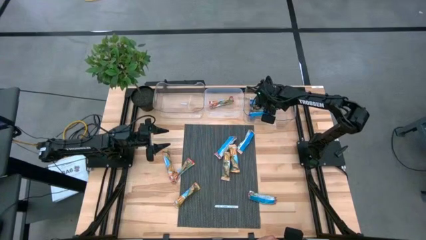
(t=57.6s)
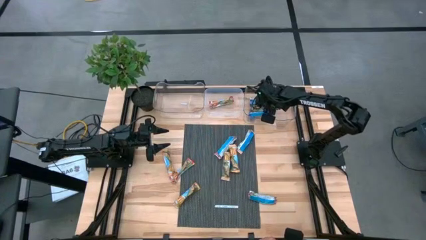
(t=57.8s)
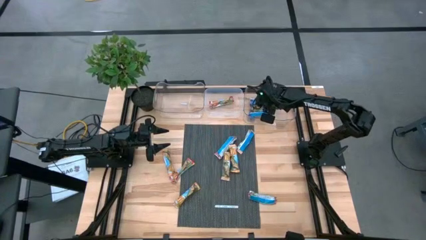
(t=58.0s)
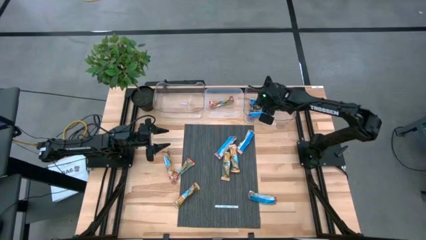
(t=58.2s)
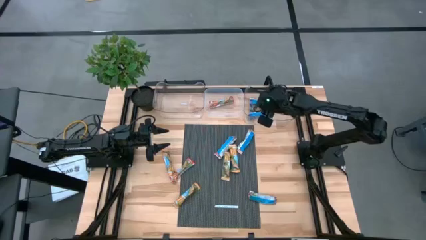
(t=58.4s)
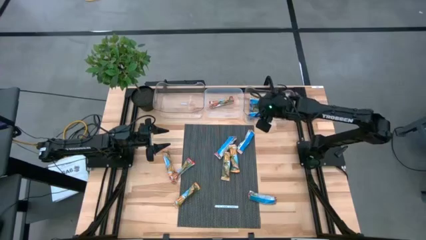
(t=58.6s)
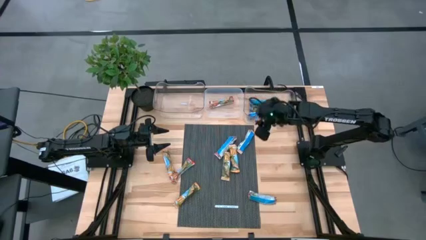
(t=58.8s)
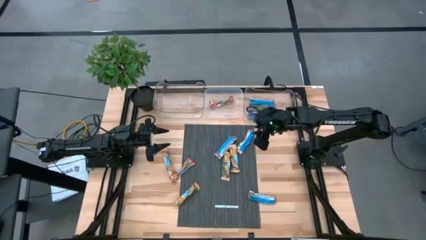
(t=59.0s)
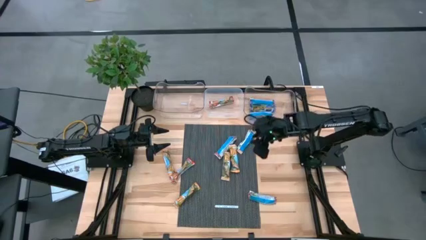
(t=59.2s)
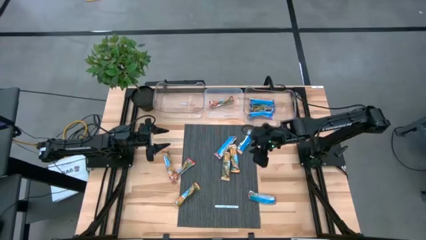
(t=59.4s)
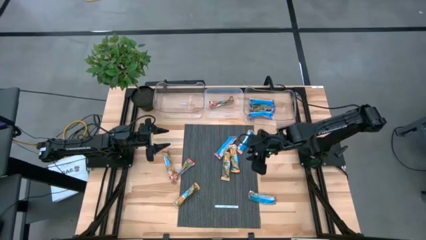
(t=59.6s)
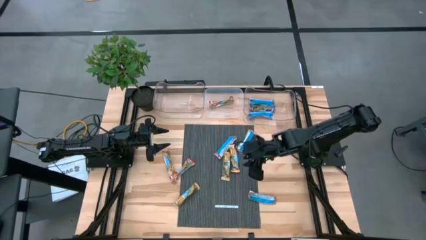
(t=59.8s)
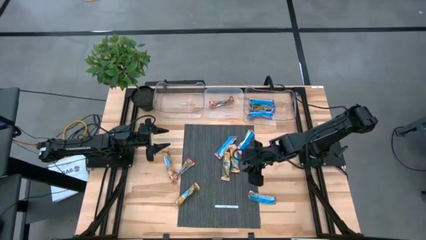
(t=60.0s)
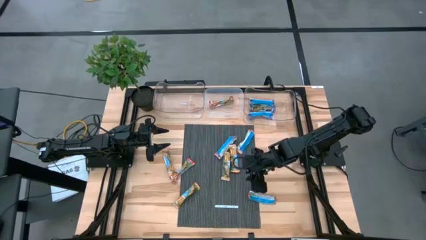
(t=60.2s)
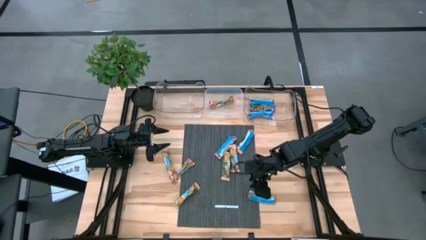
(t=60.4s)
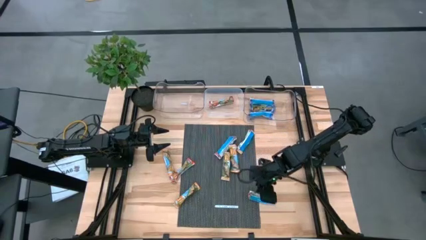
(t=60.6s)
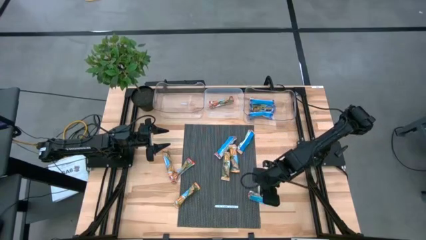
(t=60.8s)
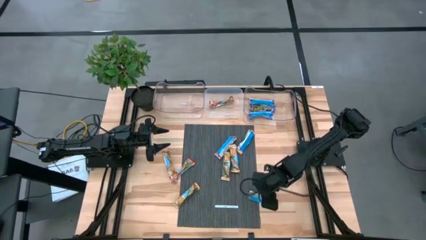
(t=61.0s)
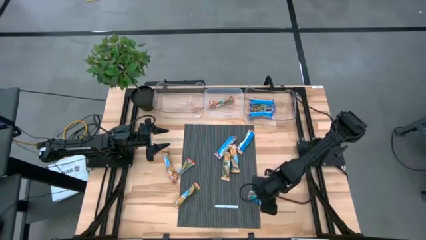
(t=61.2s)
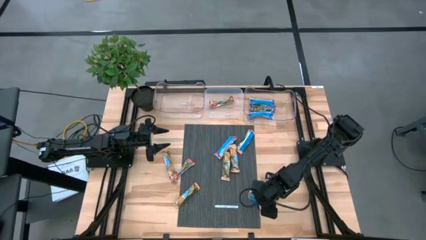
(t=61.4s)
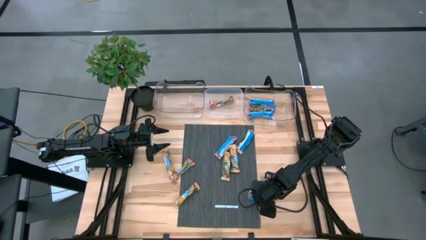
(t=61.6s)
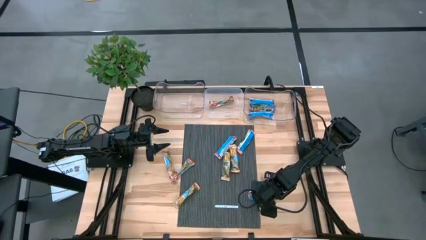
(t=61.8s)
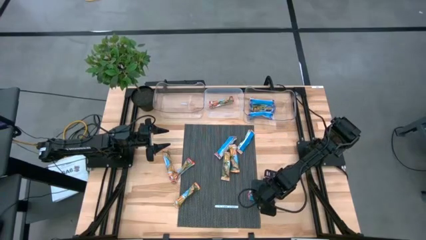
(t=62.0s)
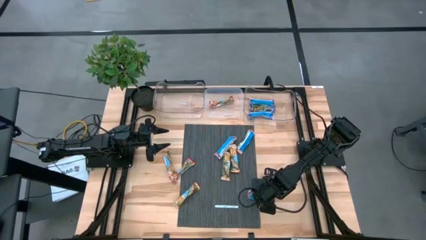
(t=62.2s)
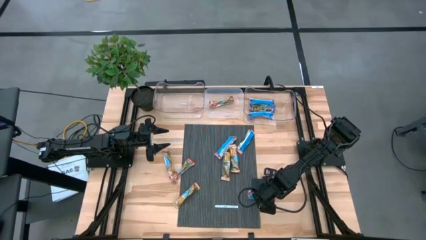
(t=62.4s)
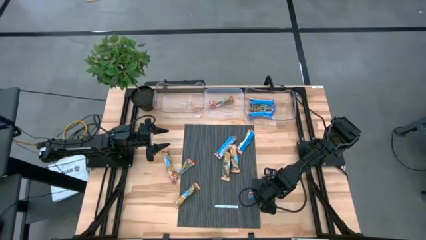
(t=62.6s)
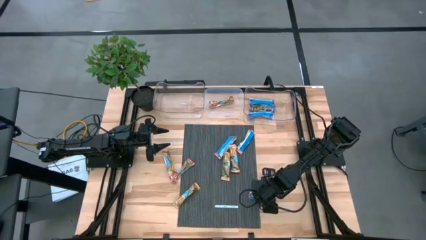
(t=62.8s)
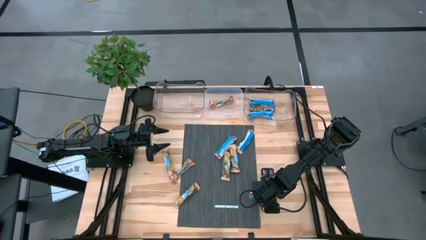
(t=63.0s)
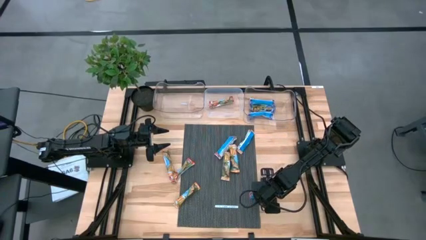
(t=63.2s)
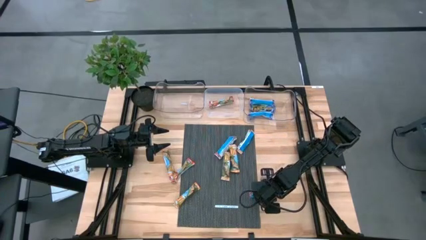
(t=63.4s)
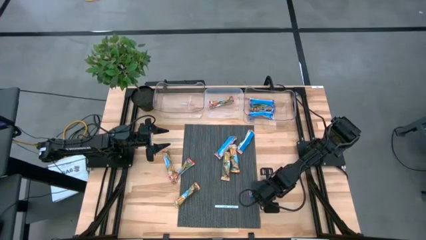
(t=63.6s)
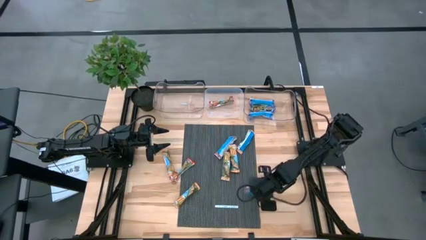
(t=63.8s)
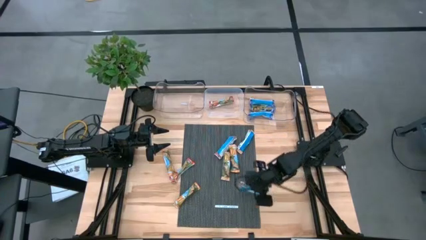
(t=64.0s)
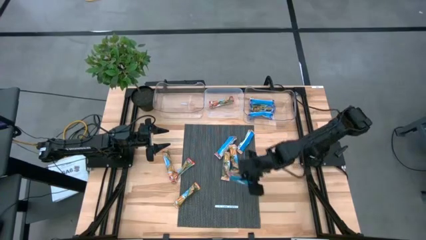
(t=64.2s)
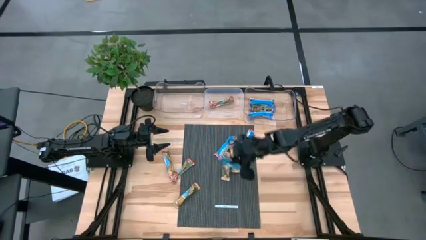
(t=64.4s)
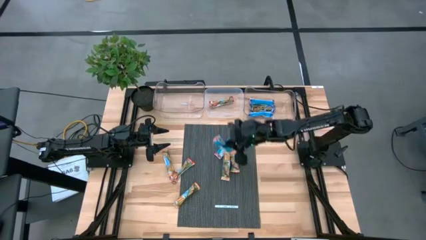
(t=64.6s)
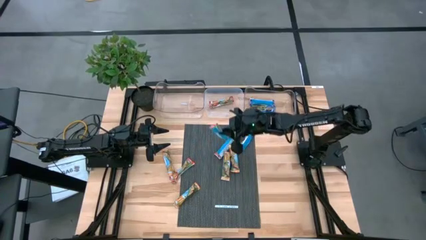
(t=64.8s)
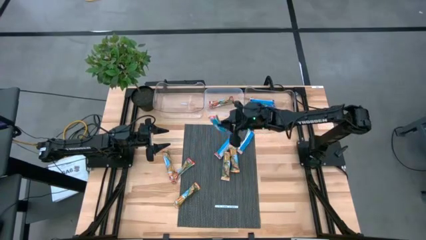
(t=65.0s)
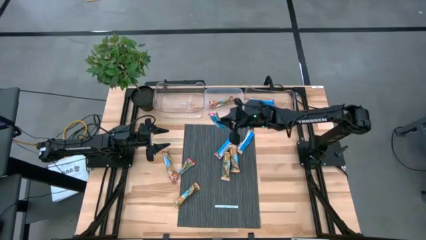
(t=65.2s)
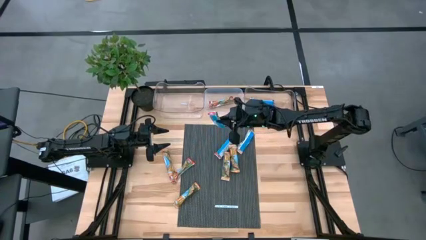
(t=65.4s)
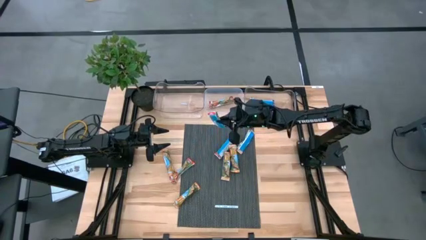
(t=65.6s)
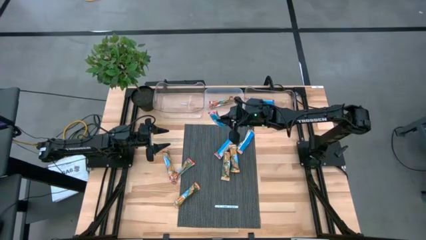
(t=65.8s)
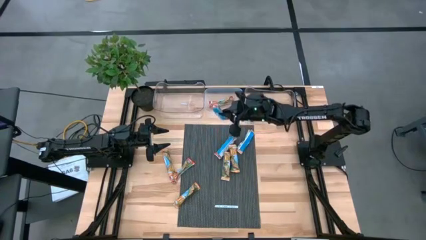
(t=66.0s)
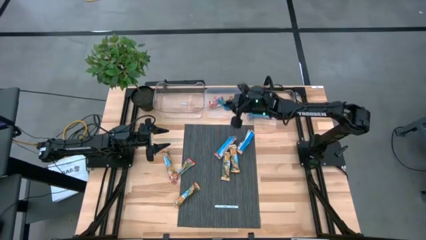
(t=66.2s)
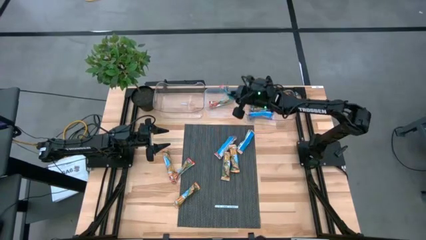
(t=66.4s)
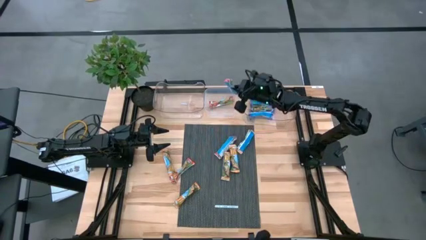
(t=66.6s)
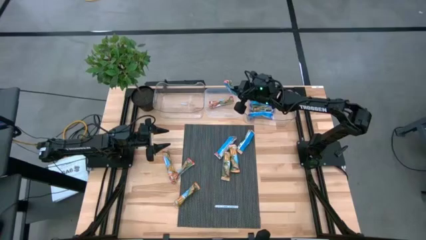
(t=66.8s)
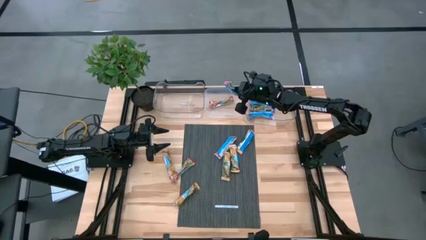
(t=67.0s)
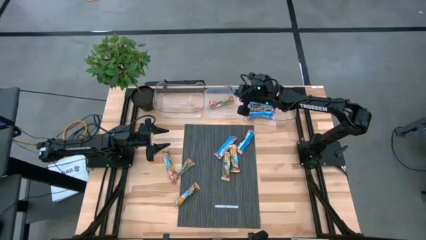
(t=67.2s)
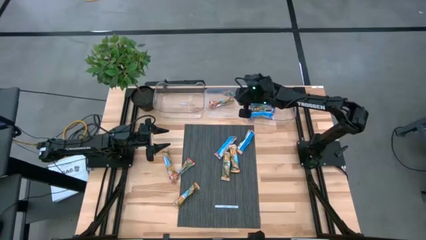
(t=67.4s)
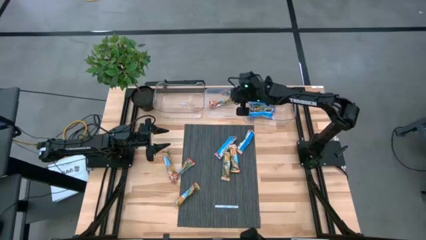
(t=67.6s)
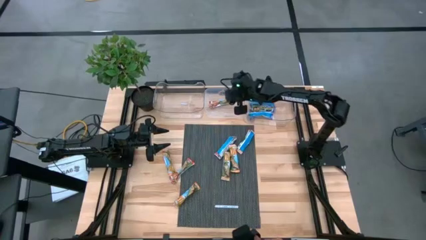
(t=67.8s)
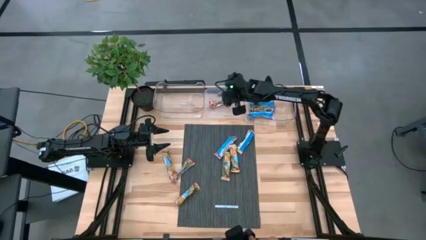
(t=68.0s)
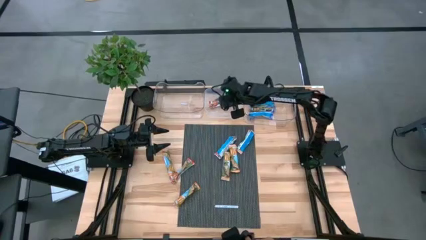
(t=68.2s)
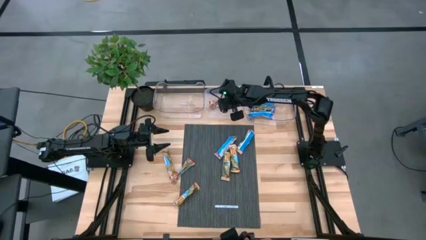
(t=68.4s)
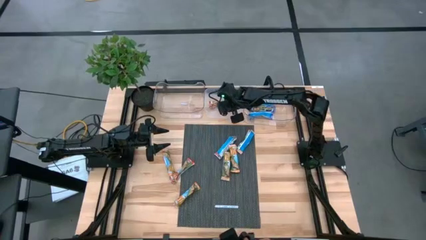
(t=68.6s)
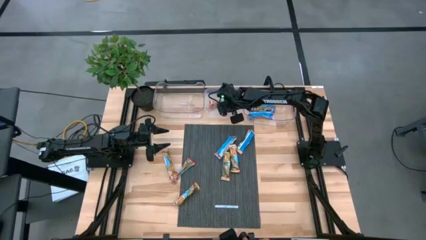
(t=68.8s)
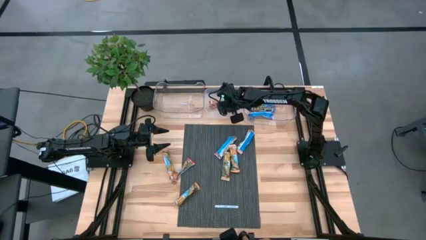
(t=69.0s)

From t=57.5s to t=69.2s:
Task: Pick and place Granola Bars by type
Put the bottom red granola bar into the white bin

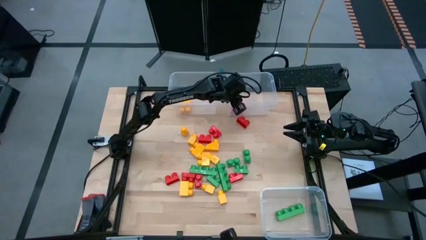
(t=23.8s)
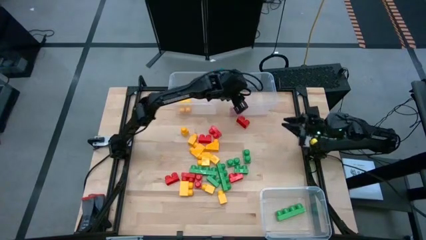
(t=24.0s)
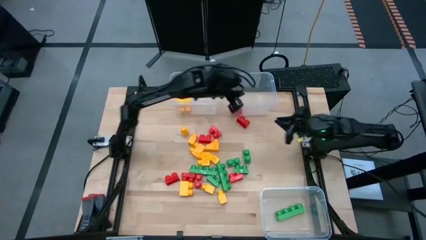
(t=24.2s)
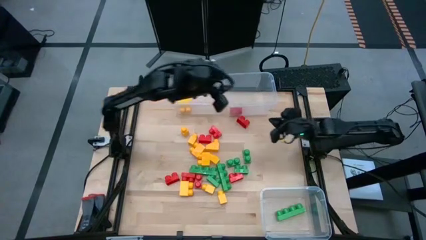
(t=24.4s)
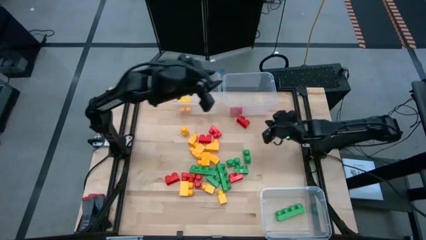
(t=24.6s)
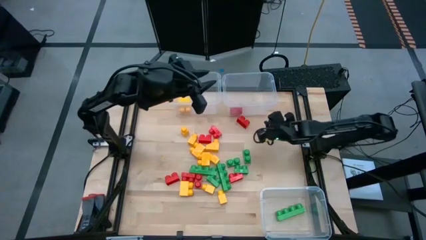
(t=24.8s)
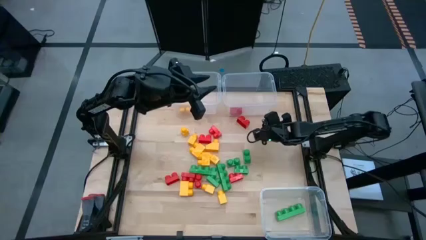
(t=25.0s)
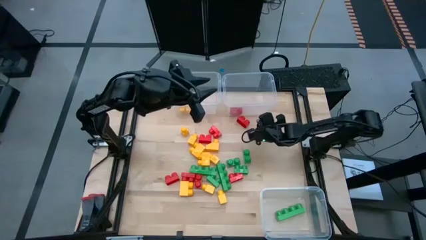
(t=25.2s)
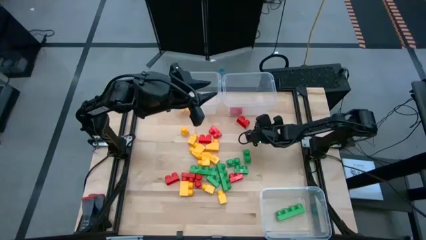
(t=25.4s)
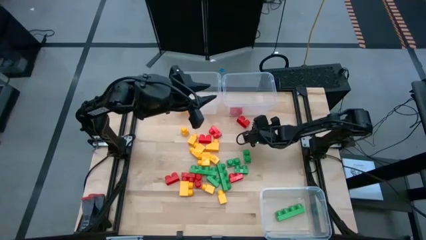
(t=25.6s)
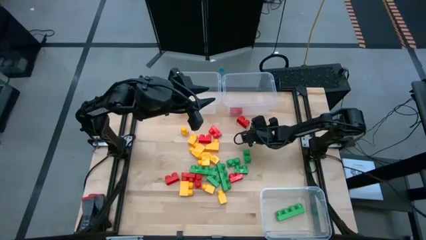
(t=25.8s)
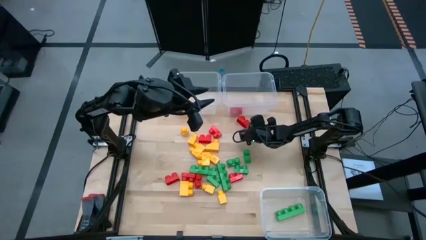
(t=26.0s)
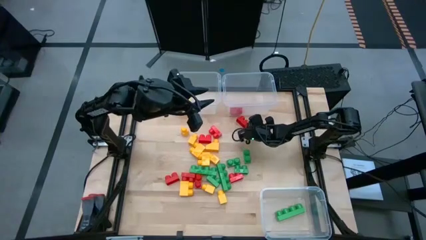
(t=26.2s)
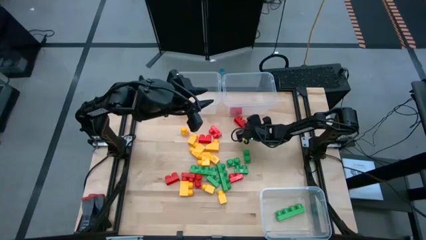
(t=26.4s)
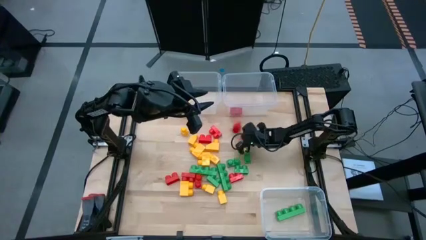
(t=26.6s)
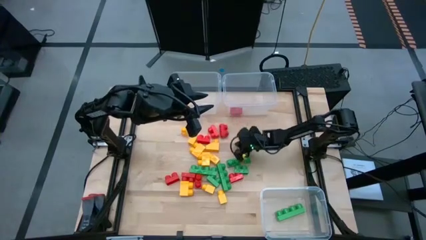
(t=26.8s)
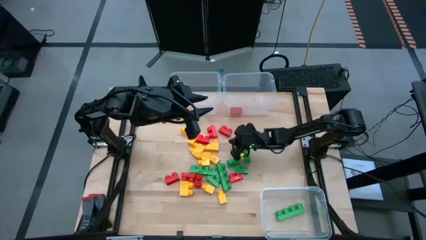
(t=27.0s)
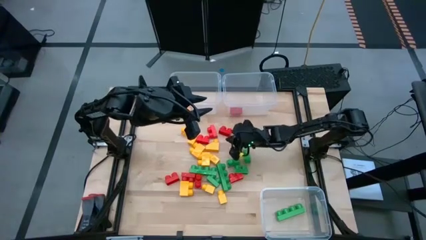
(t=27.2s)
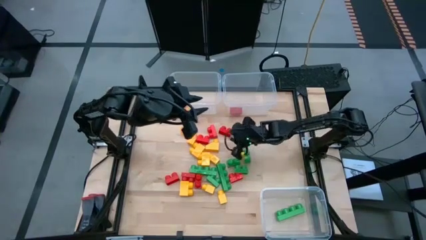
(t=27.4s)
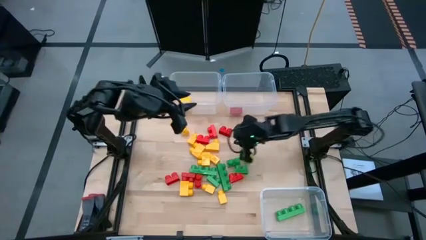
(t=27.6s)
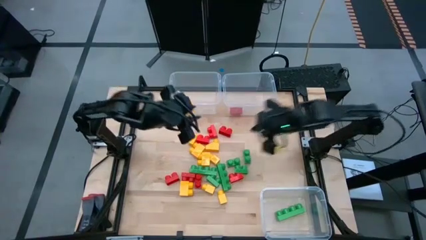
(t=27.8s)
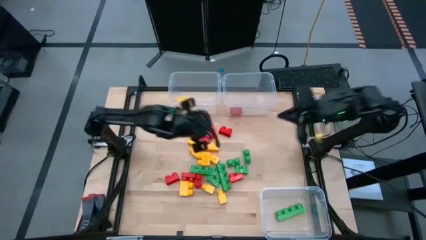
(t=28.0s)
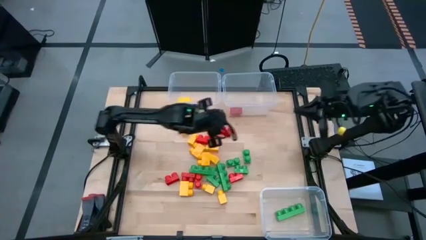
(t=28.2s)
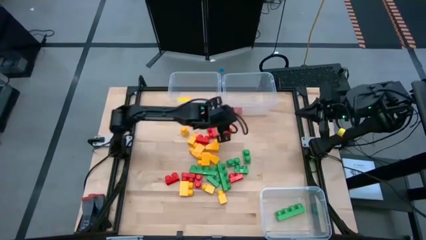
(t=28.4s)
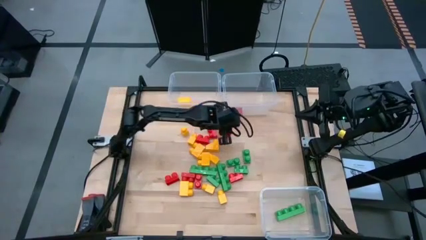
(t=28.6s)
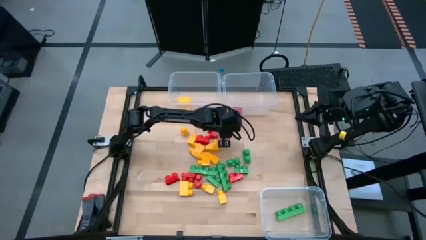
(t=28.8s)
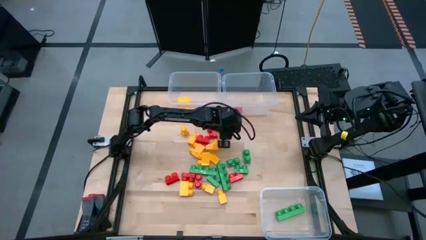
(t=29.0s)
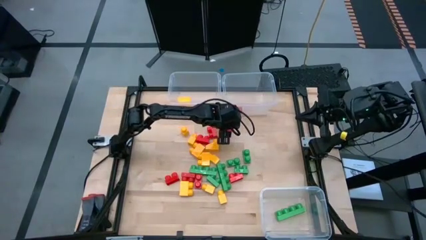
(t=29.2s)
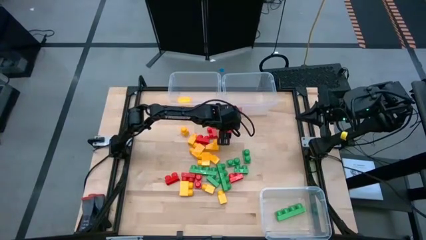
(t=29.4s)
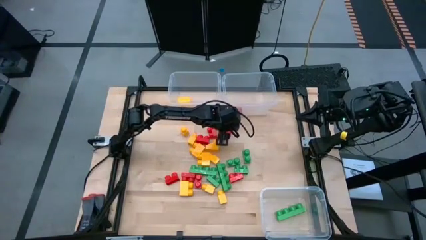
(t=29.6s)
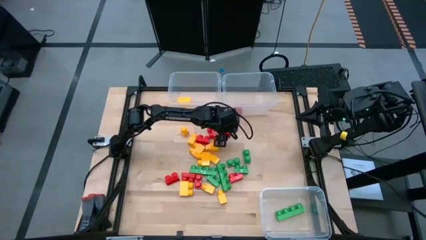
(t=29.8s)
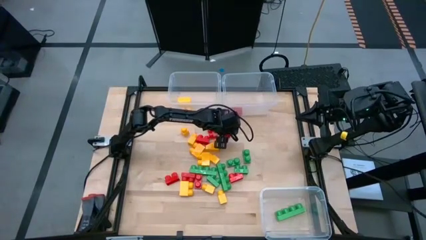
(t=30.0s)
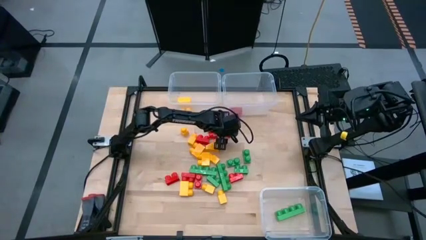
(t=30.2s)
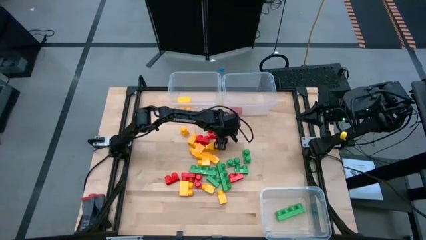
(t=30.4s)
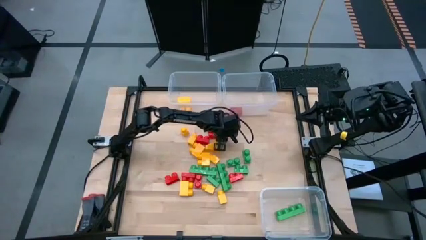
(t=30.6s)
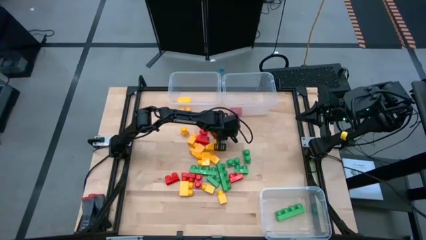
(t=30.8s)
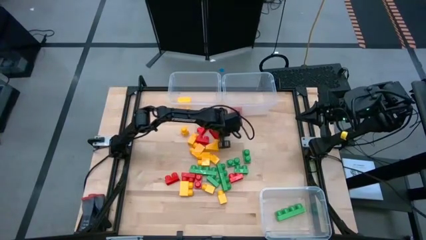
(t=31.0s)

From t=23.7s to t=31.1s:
Task: Sort blocks
Put the red game piece into the top right transparent bin
